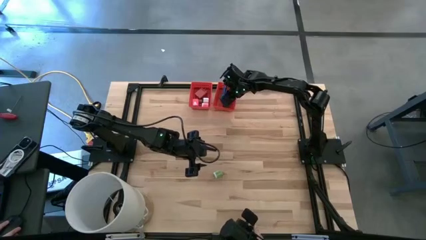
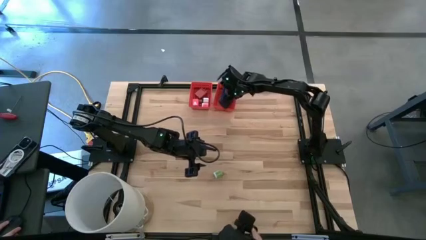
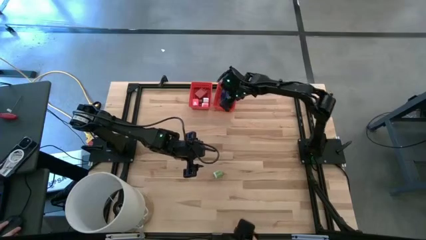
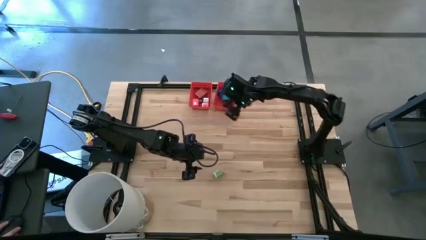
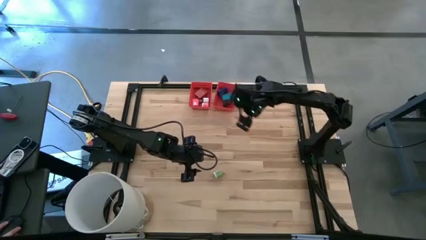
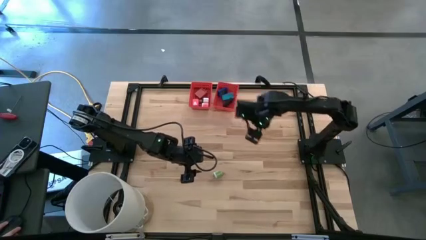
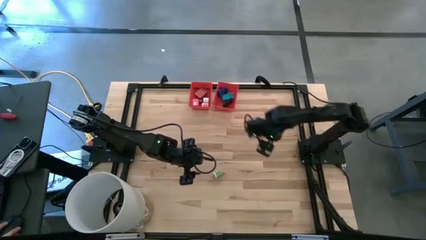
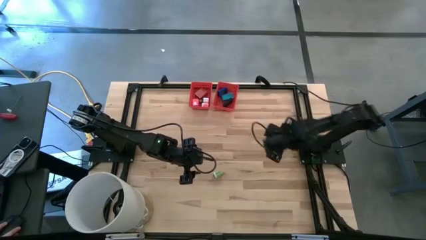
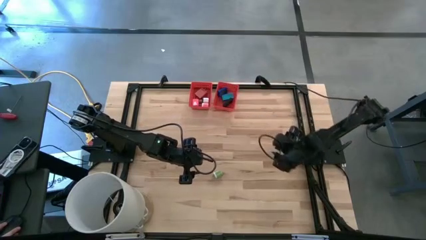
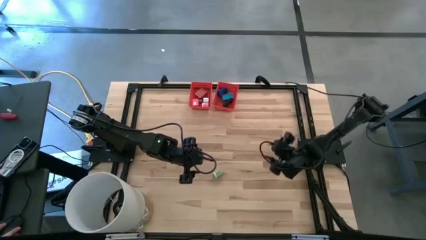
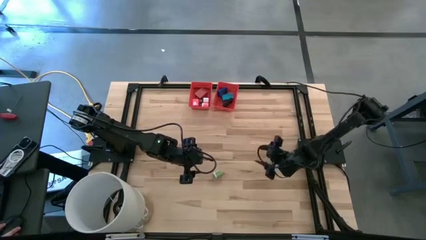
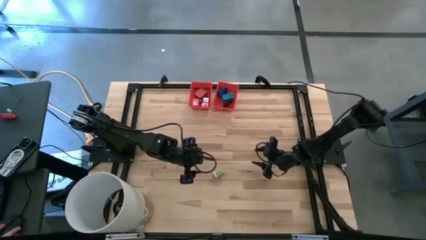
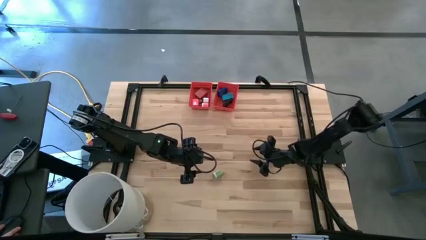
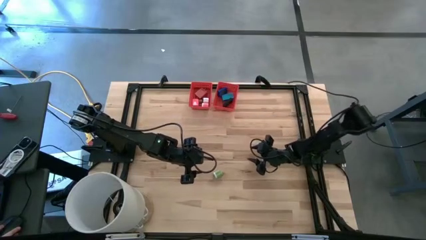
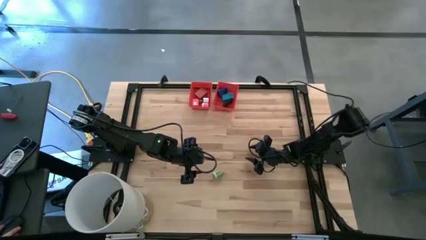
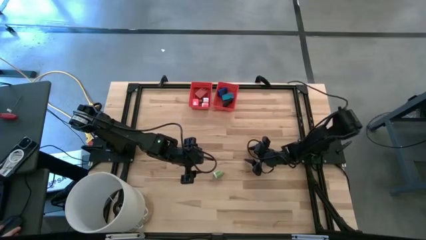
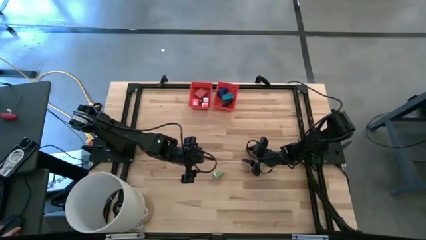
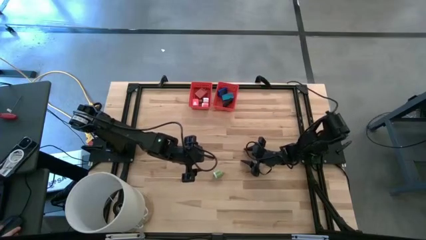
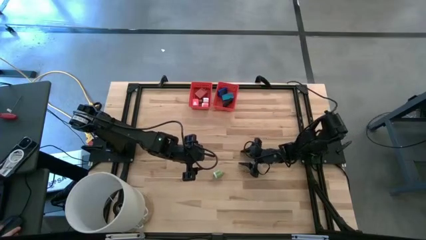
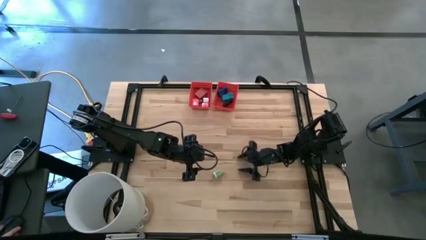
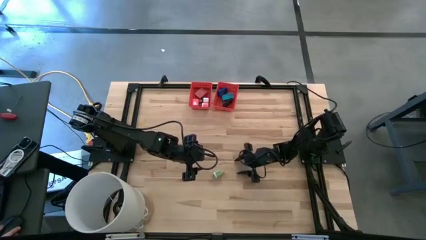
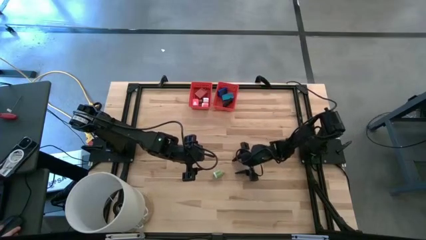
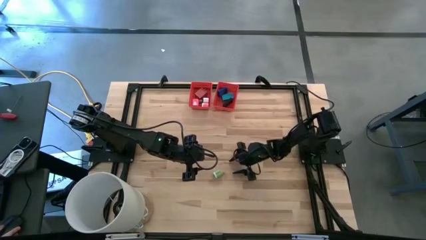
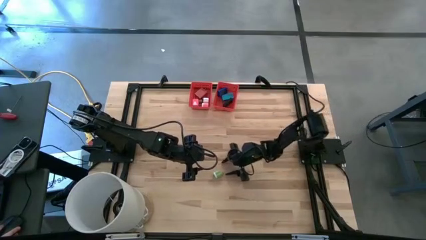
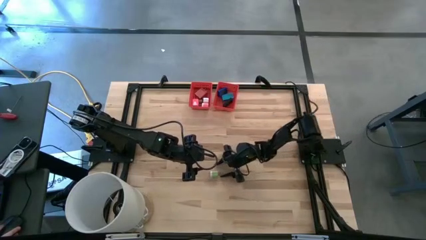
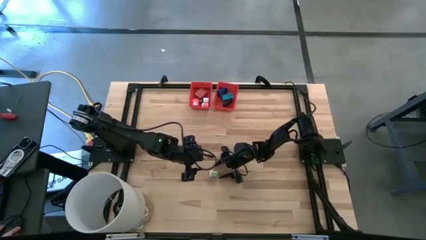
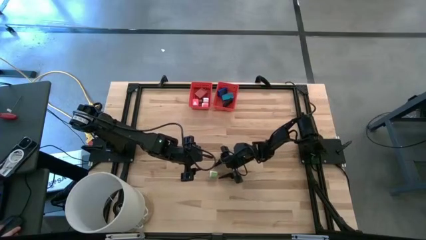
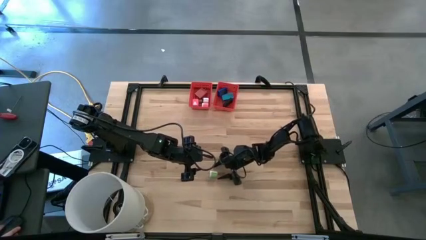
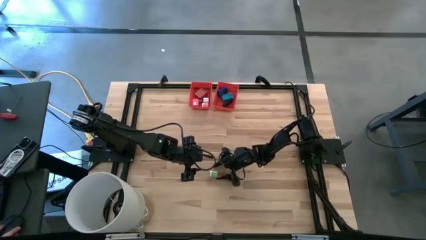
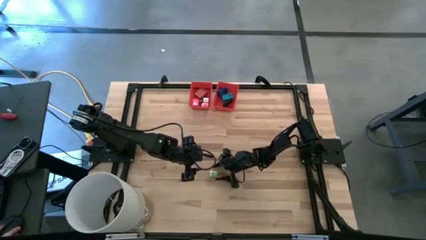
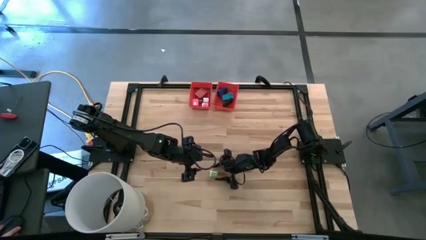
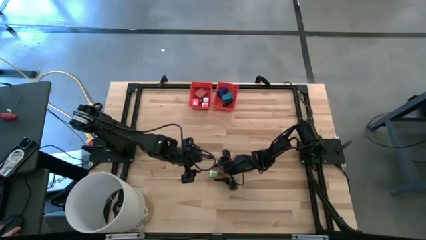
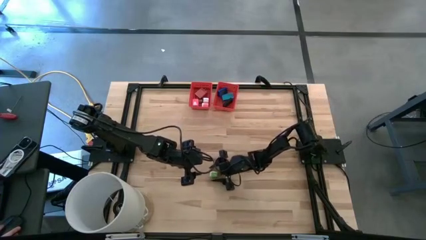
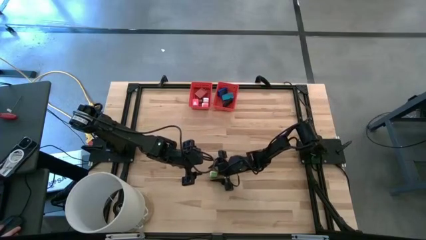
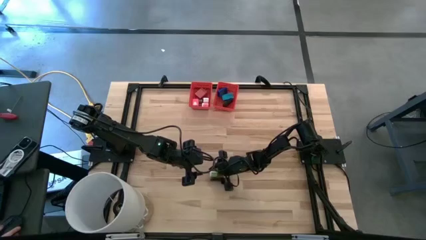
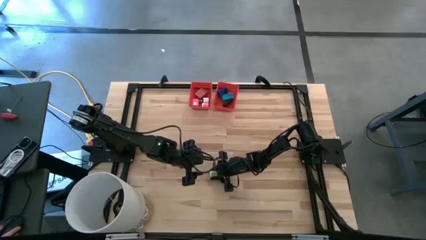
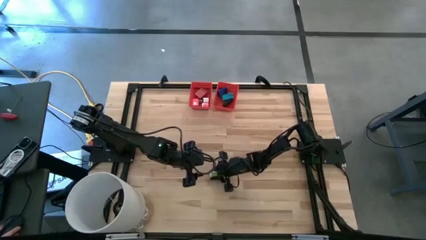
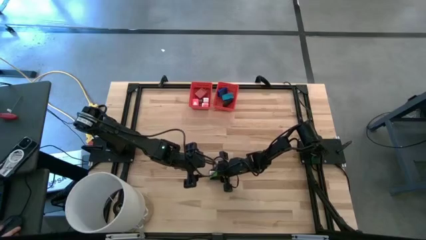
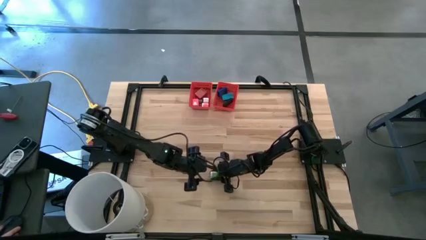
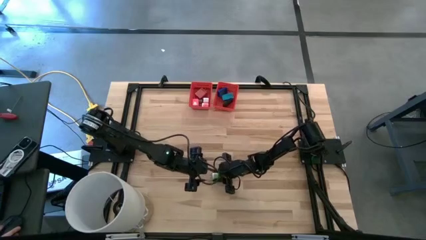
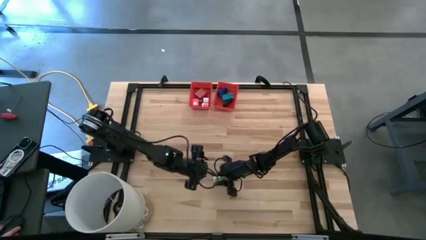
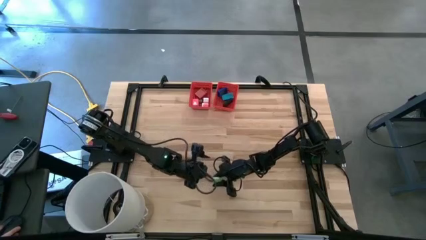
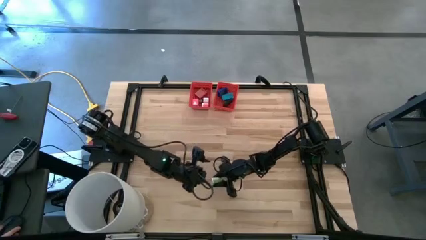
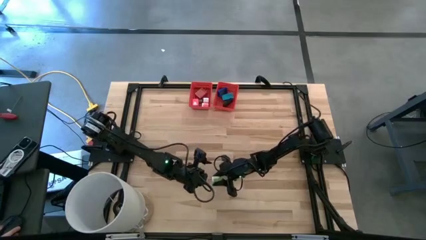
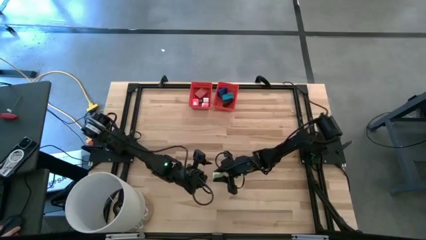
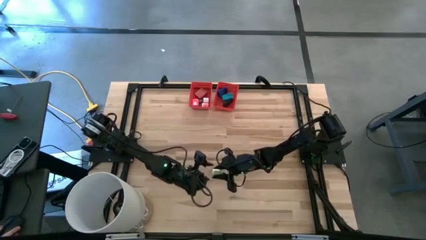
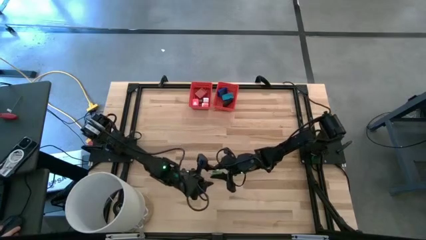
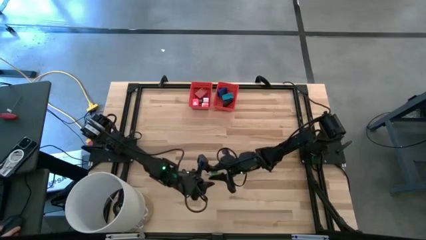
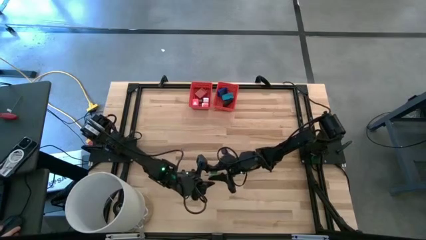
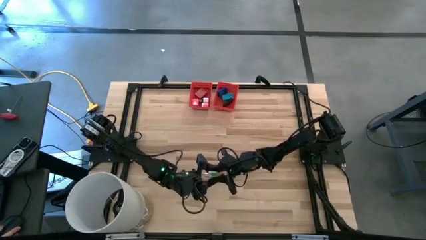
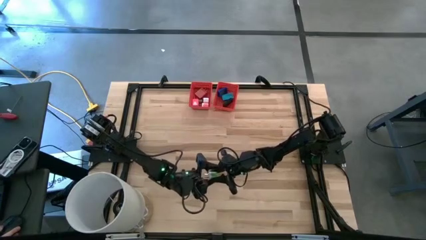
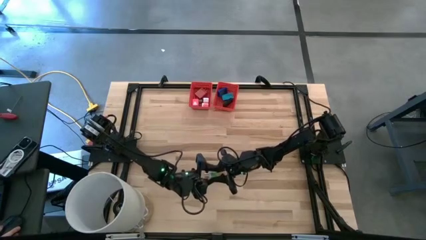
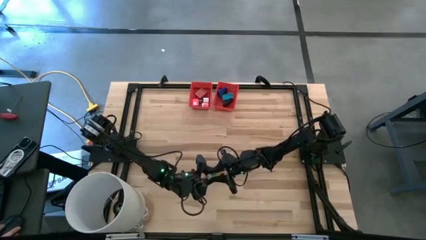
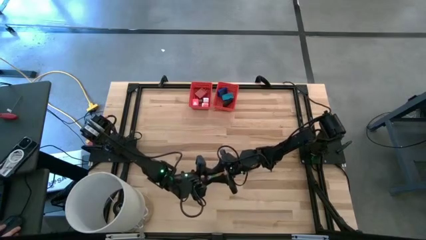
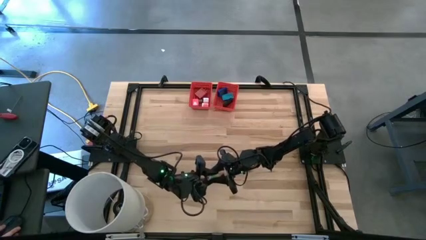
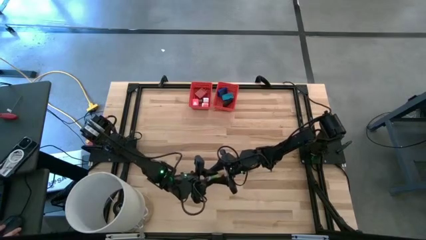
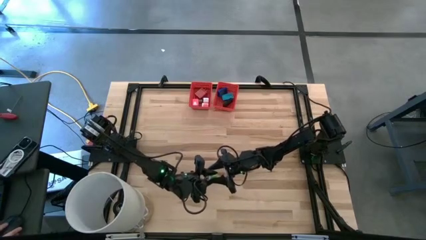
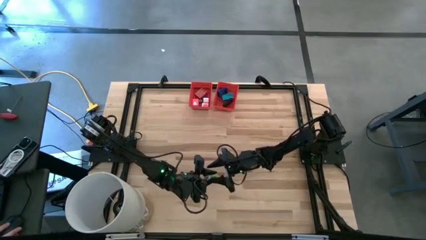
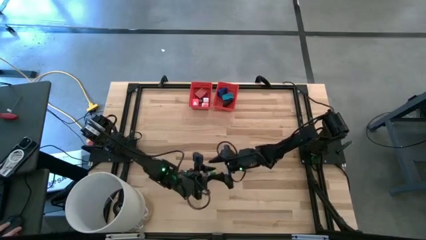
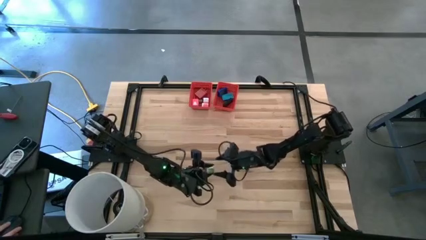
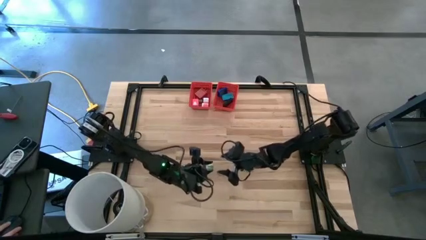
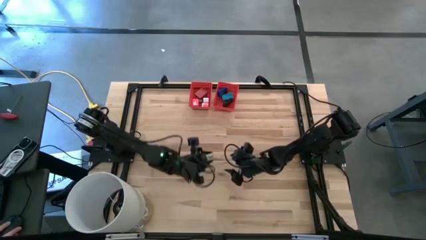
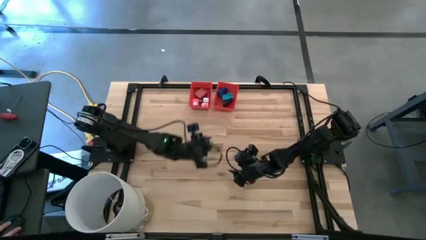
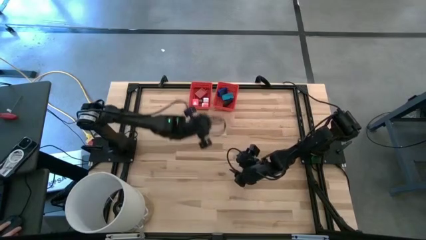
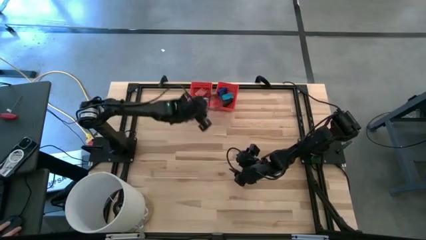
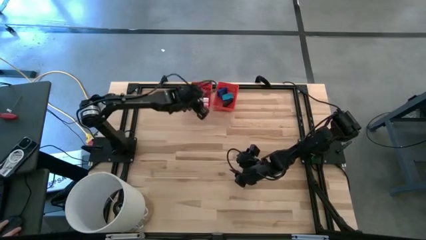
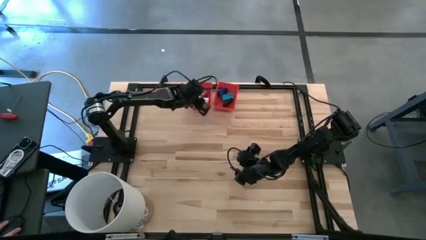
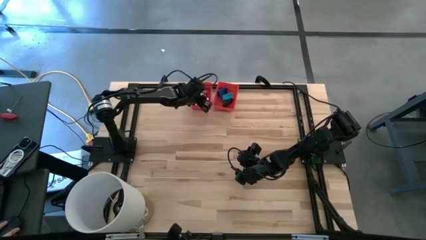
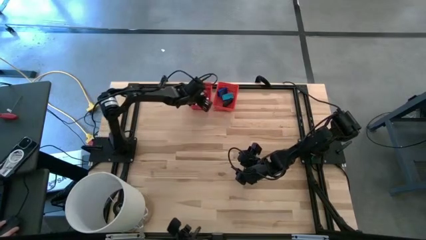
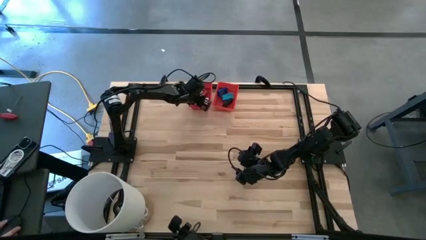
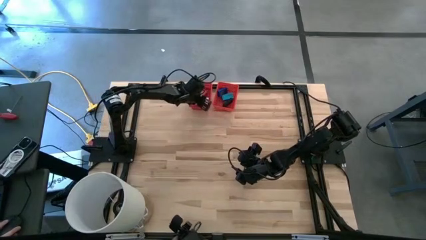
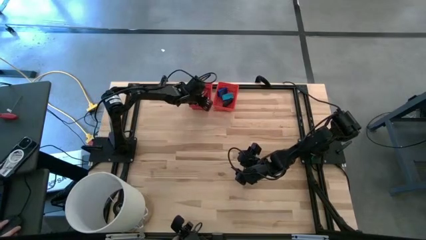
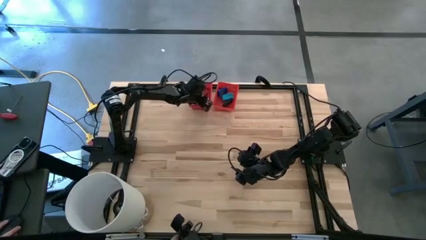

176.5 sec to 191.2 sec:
Task: Pick & Place Office items
Put the green charger adapter into the left red basket

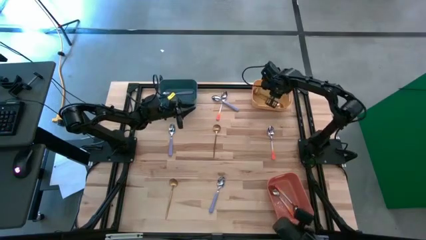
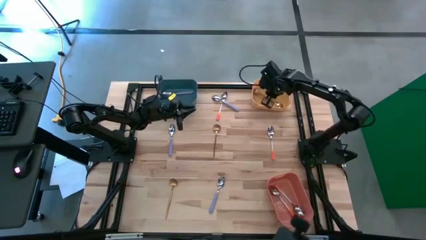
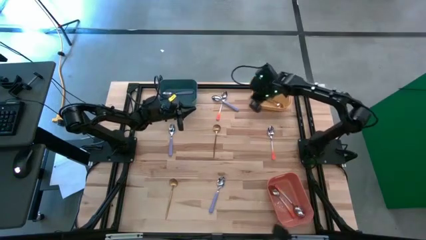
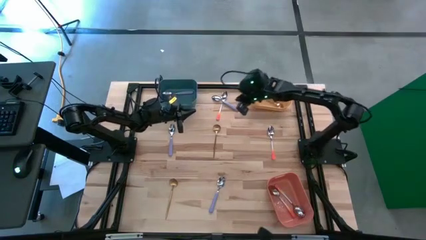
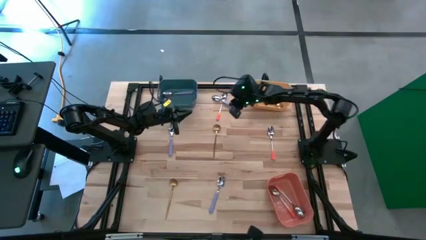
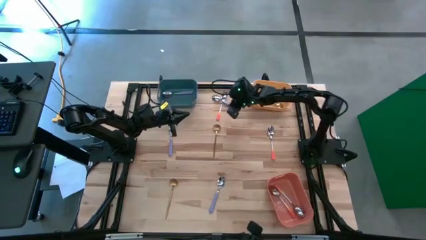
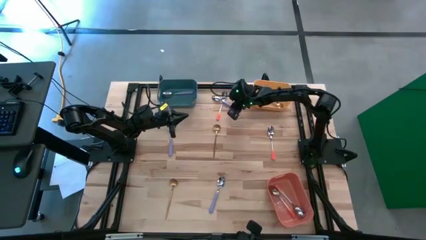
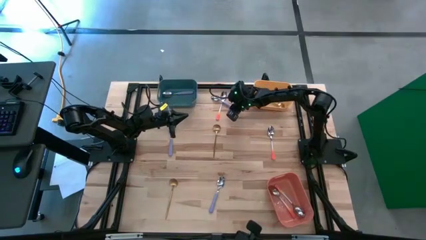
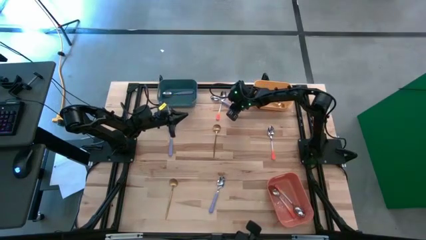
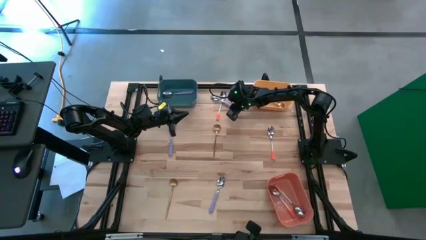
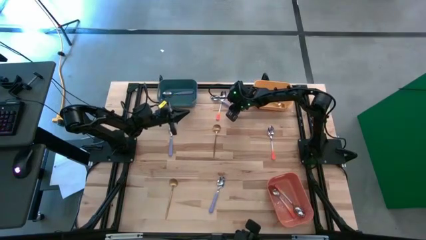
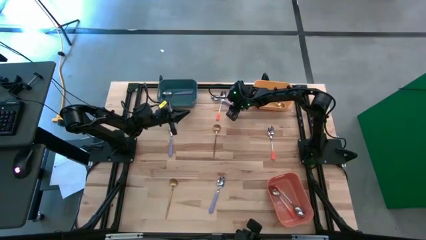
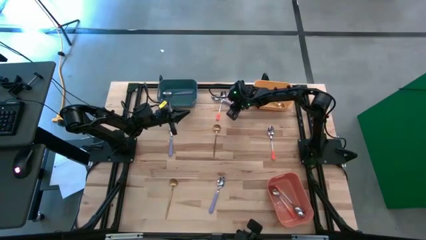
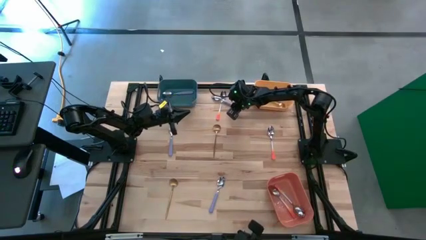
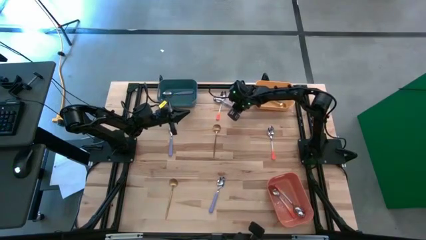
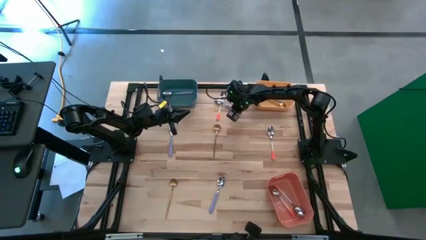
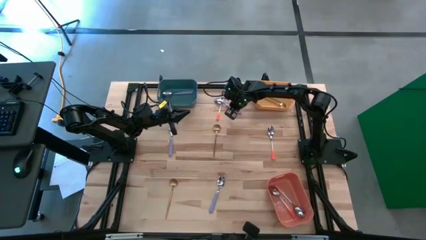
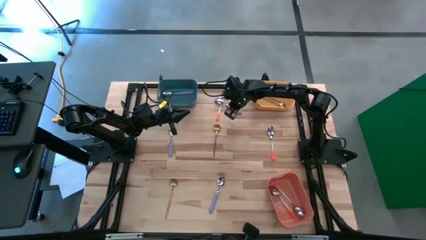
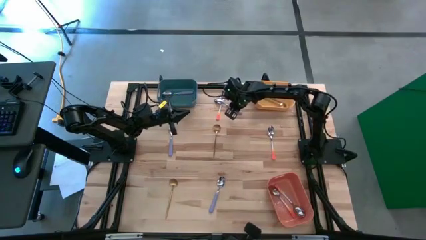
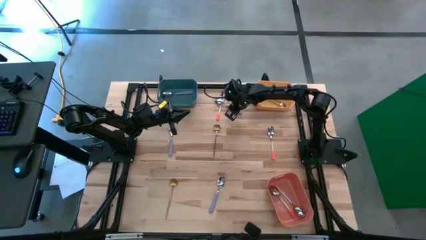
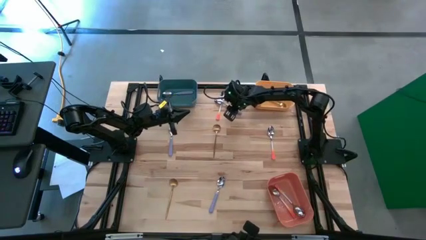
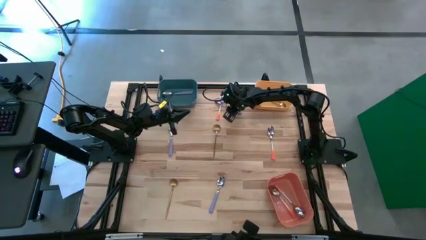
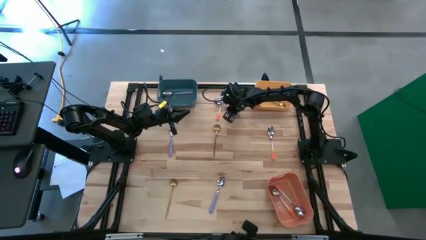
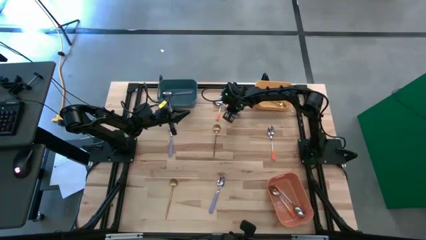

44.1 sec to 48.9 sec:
Task: Sort silverware by color (type)
Put the top center violet spoon into the dark green bin
